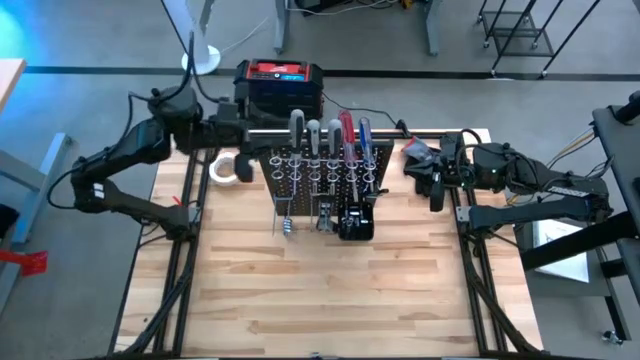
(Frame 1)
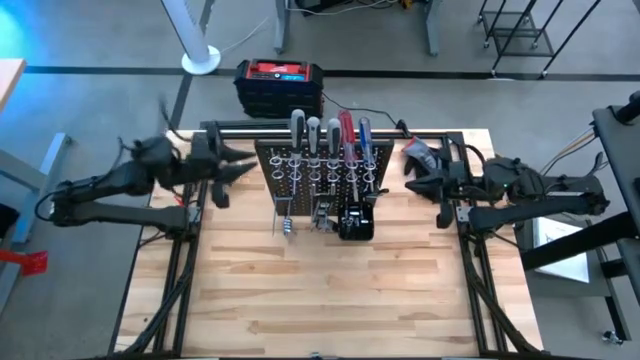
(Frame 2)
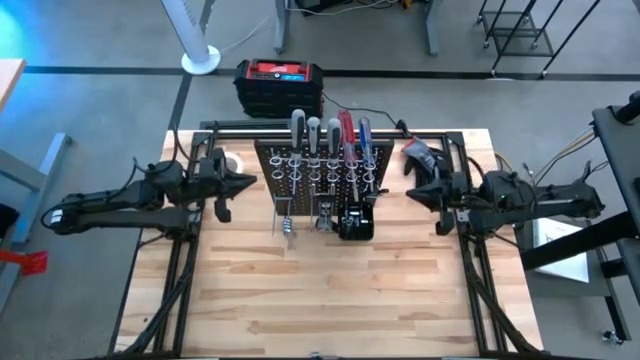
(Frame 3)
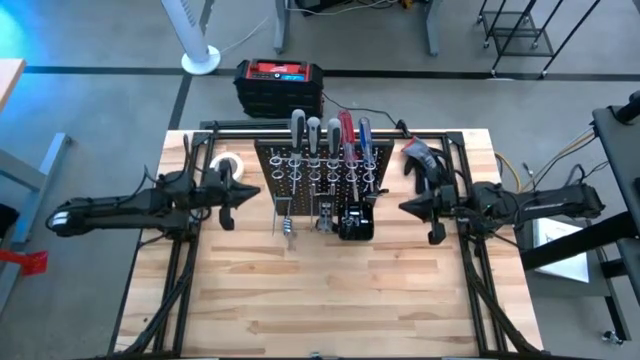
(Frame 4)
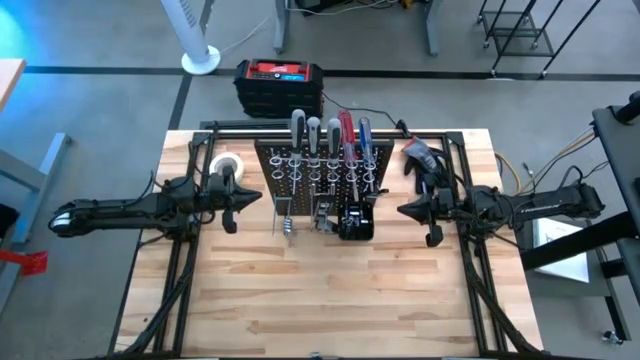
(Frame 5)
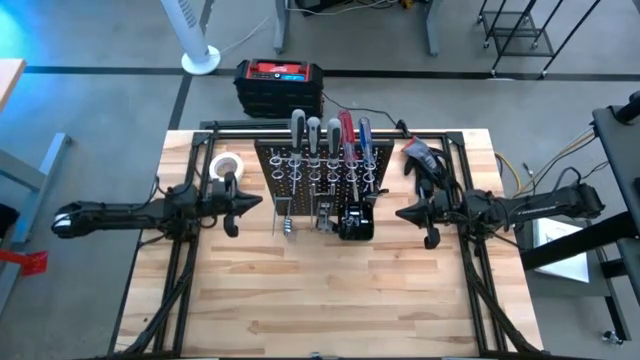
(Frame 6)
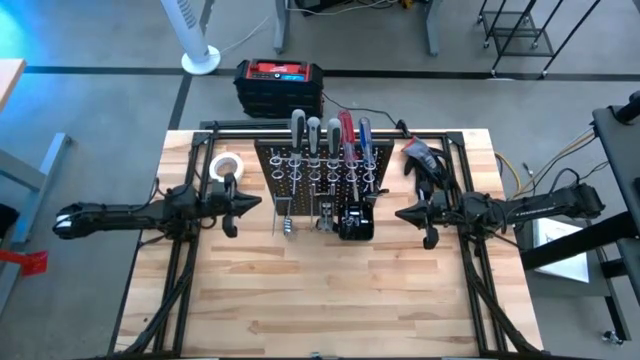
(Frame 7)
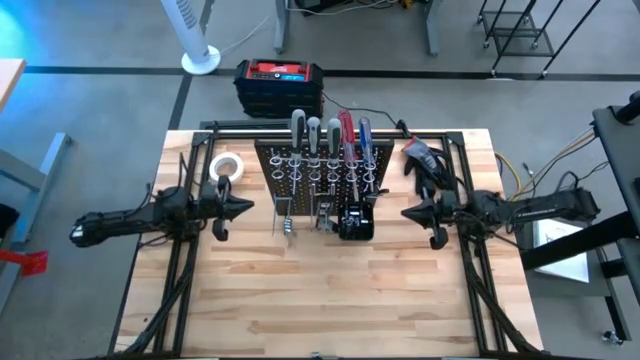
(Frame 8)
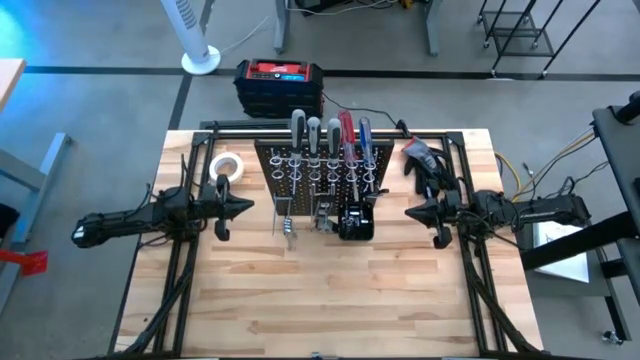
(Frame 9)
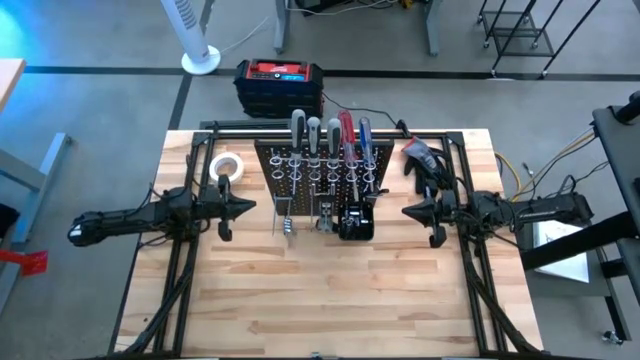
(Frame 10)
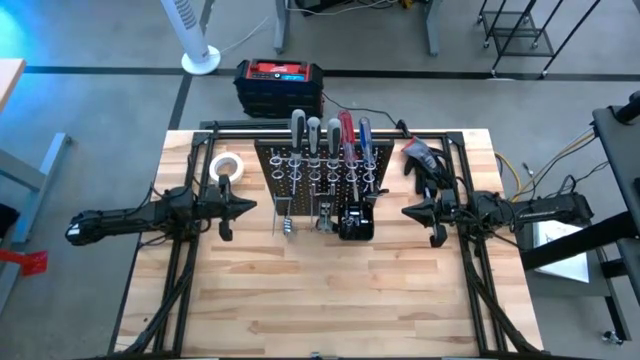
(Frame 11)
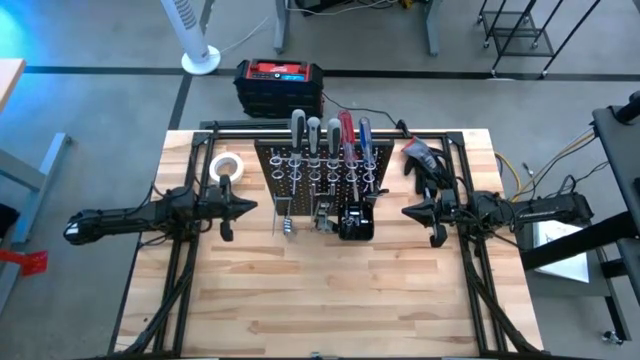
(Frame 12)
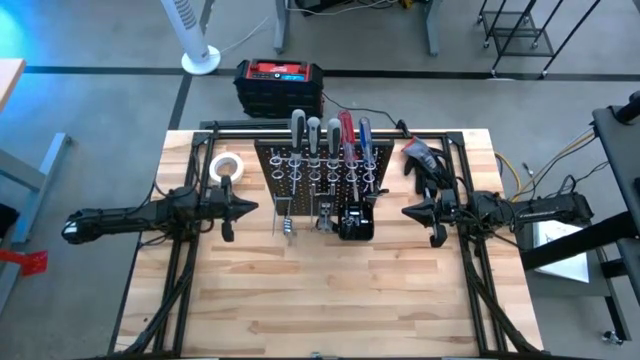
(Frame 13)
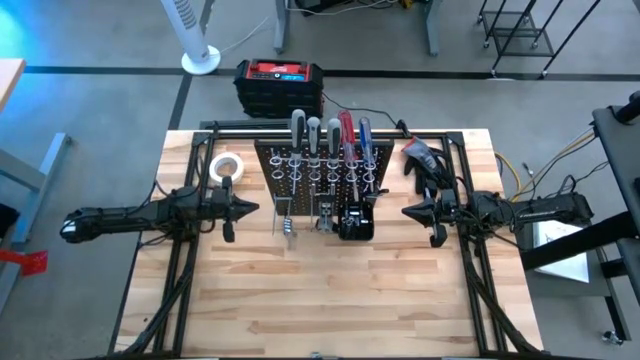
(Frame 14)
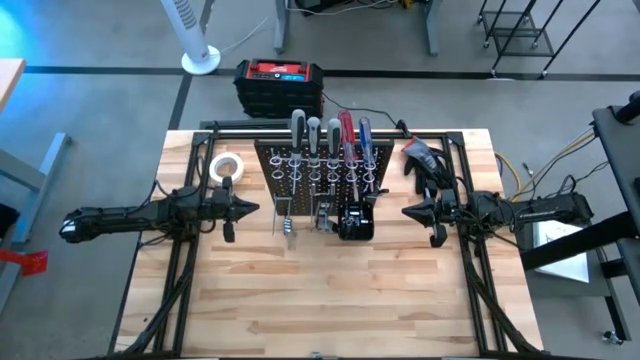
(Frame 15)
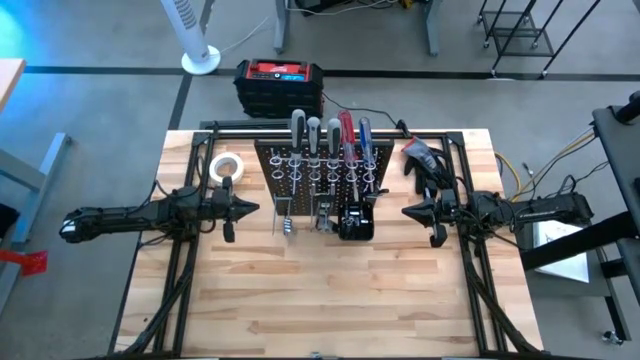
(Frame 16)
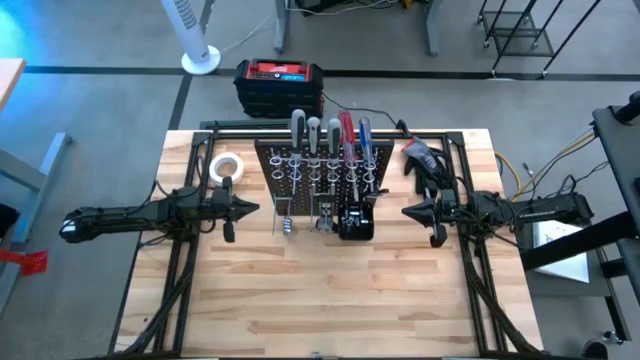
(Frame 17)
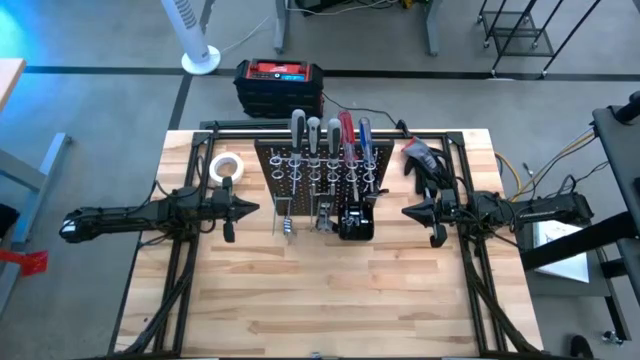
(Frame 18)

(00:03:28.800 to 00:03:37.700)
Task: Hang tools onto peg board
Return to Home Position

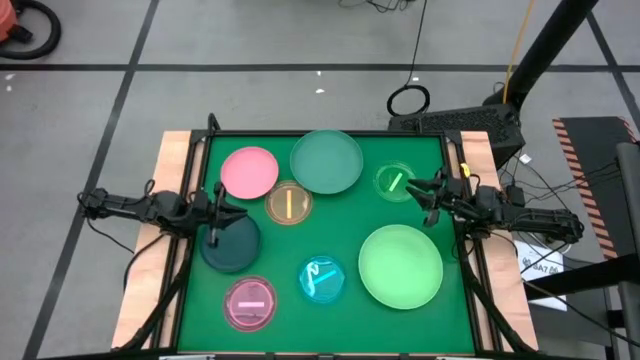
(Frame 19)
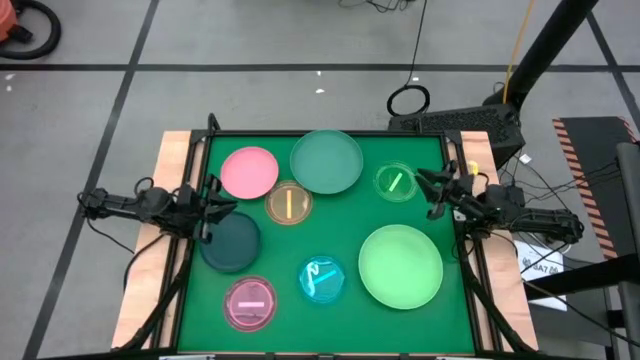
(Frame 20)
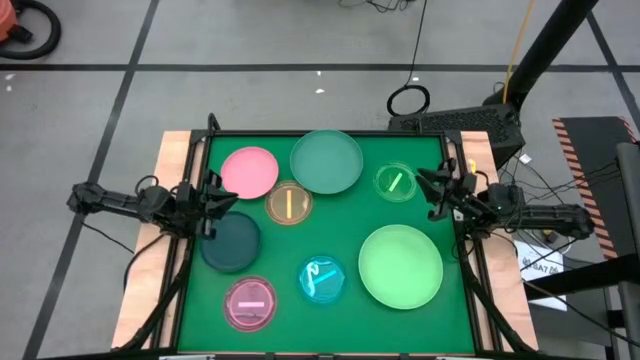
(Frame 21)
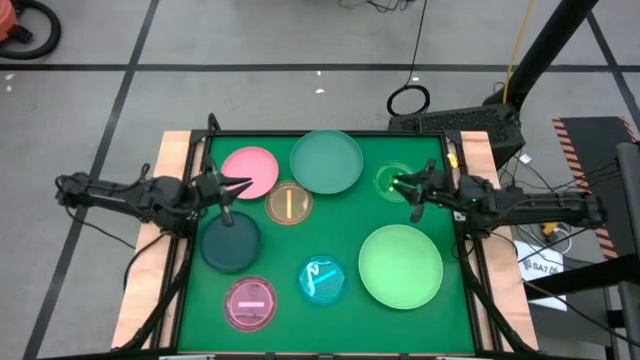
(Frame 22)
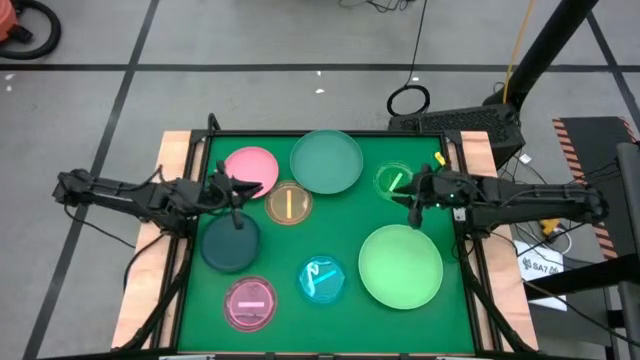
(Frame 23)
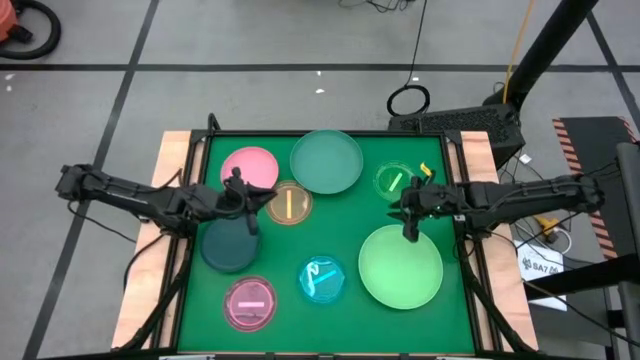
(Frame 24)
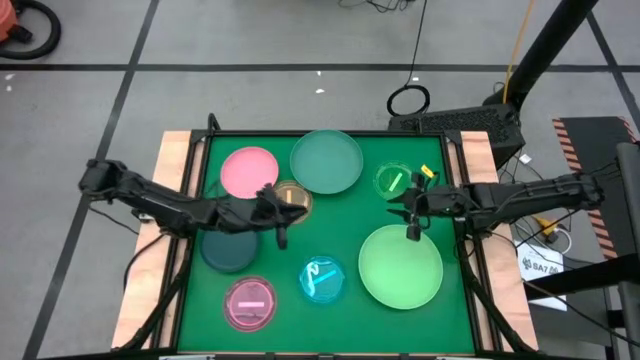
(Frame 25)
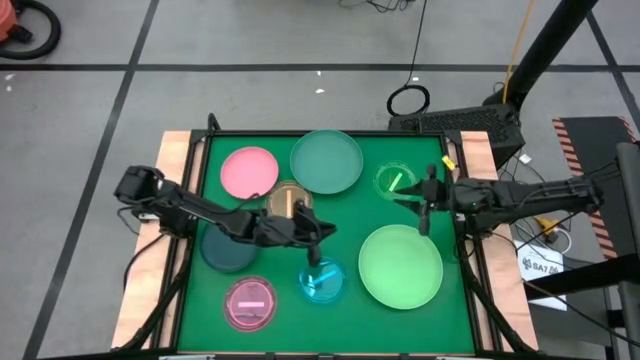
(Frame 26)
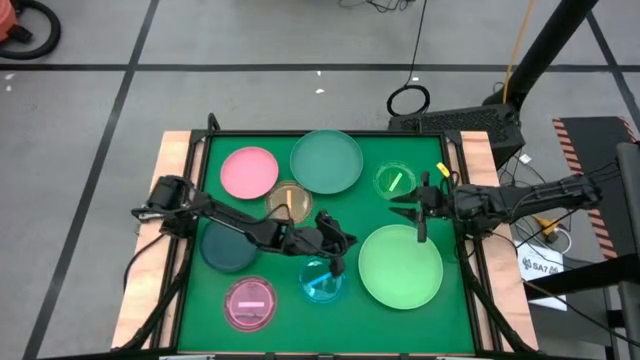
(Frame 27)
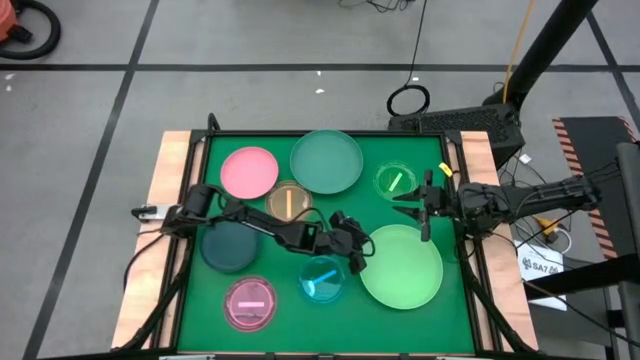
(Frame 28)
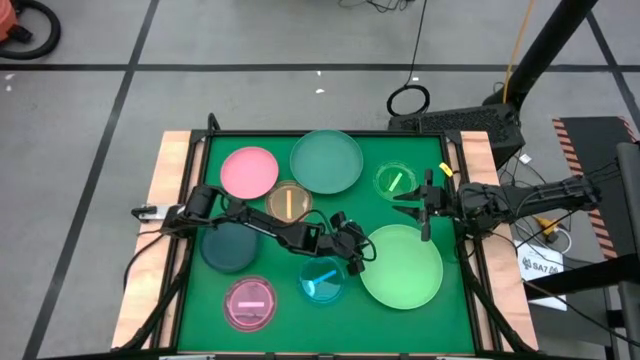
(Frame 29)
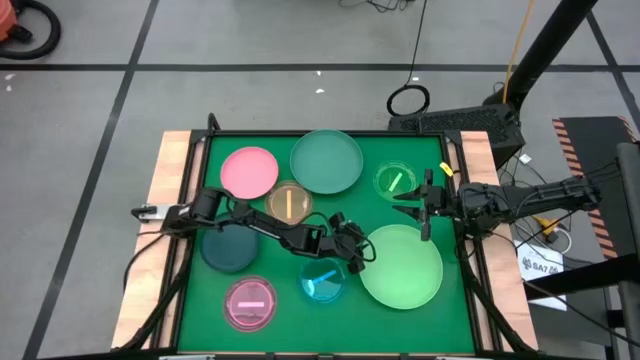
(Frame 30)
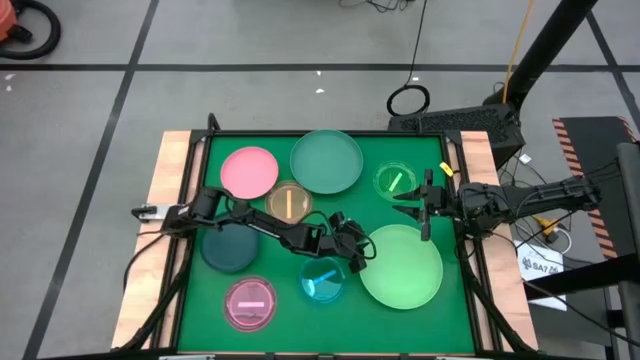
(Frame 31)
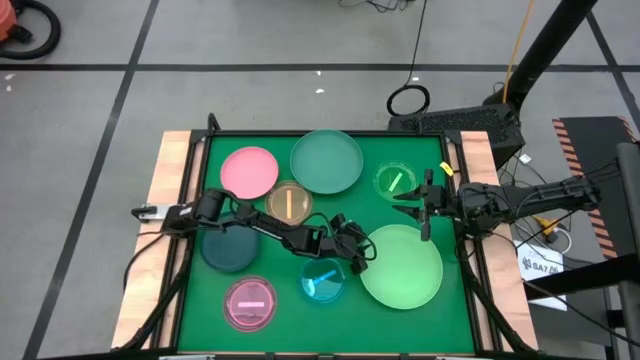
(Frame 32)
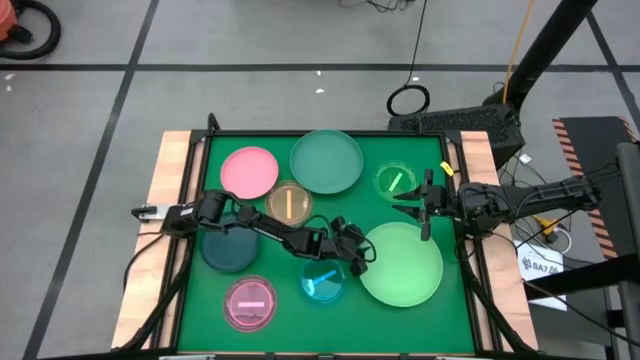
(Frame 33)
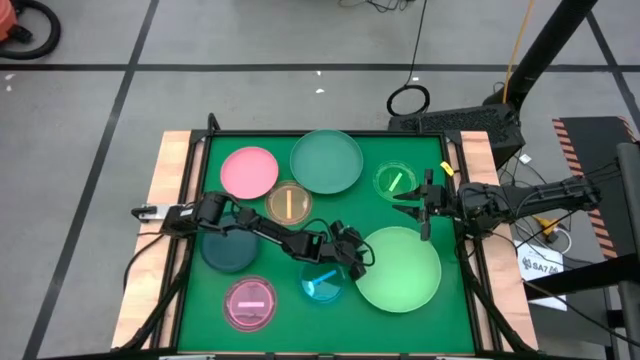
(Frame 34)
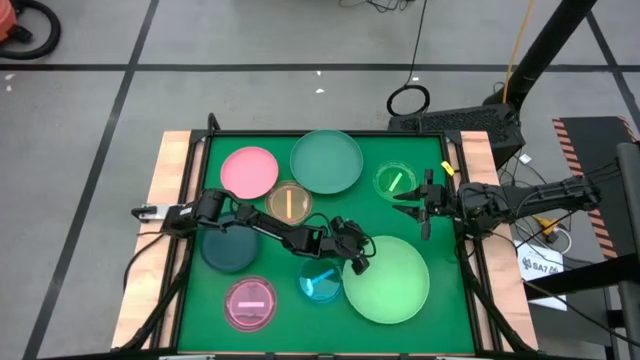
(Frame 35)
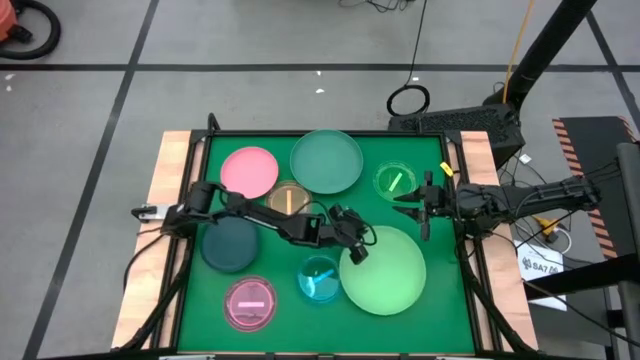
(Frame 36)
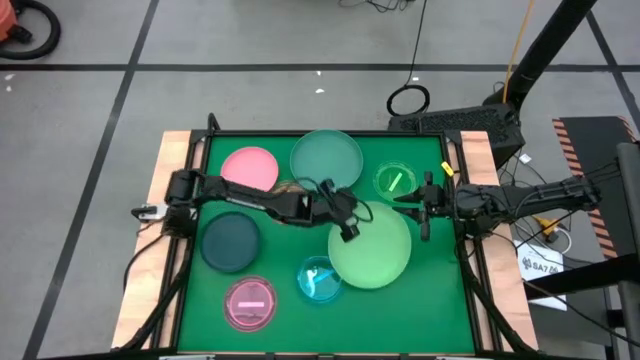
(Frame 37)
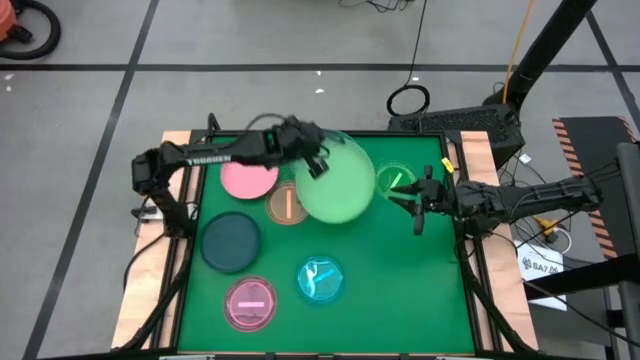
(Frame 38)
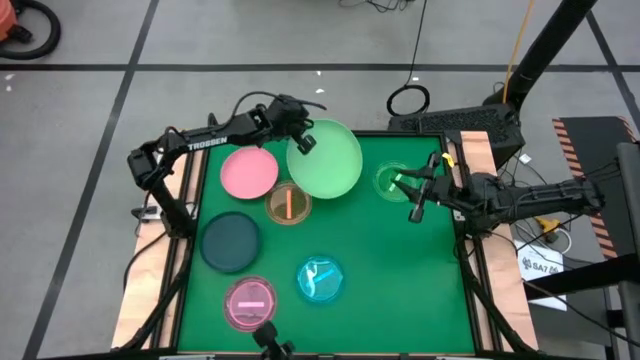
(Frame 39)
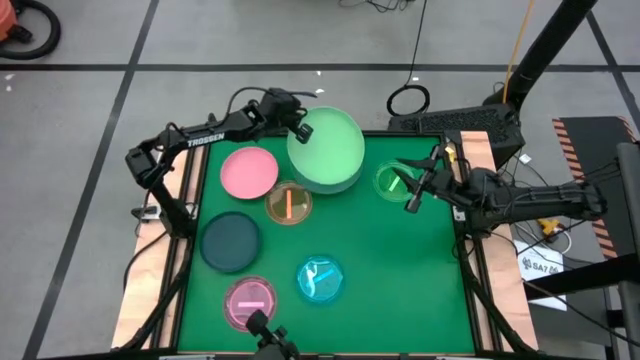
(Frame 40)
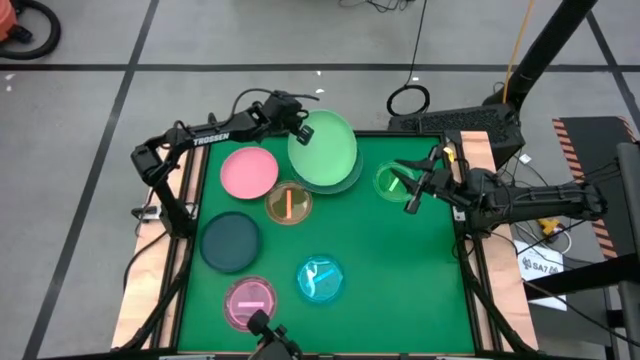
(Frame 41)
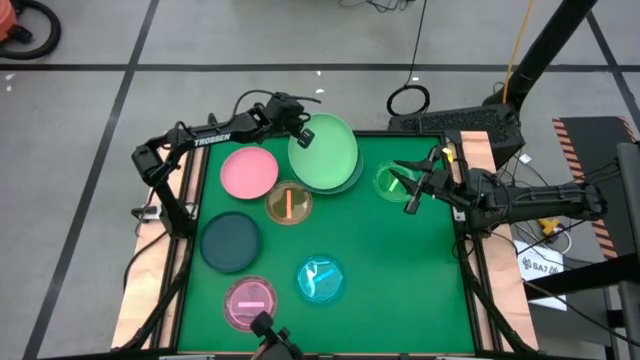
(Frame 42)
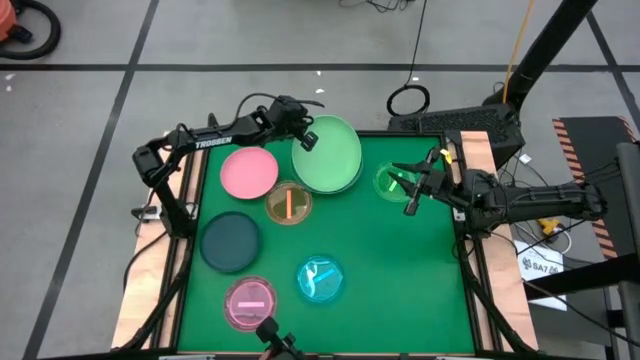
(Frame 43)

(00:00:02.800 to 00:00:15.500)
Task: Stack plastic plates
Stack the light green plate on top of the green plate
